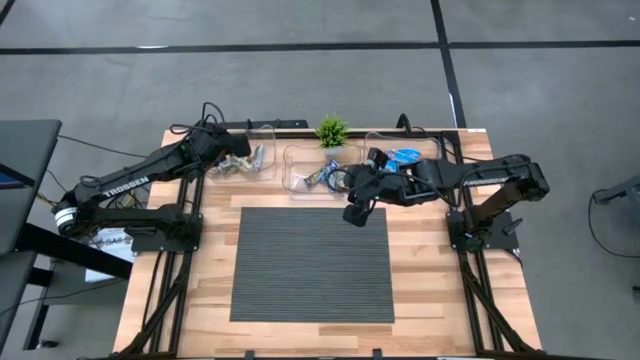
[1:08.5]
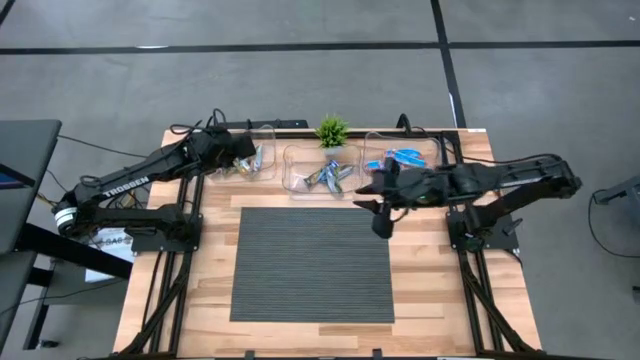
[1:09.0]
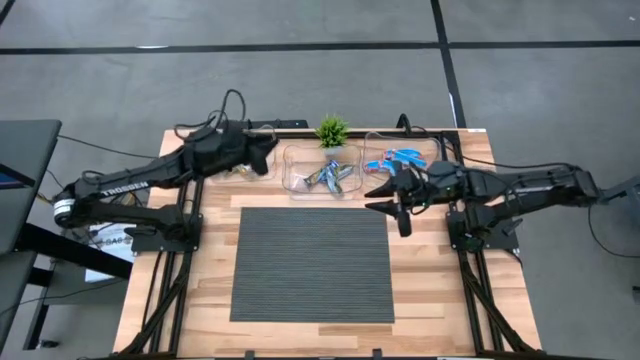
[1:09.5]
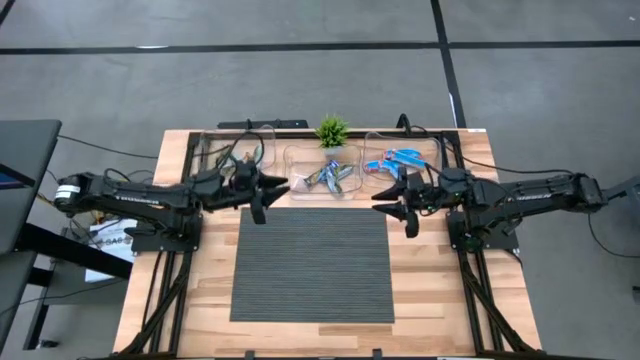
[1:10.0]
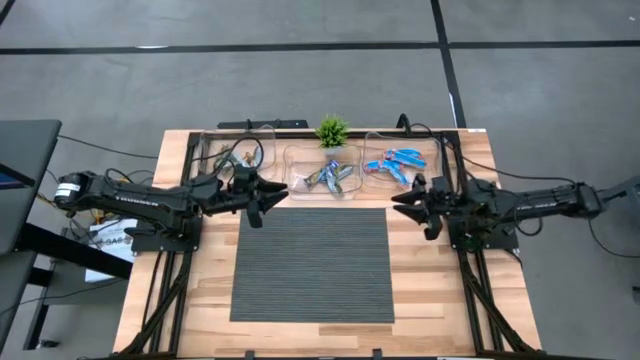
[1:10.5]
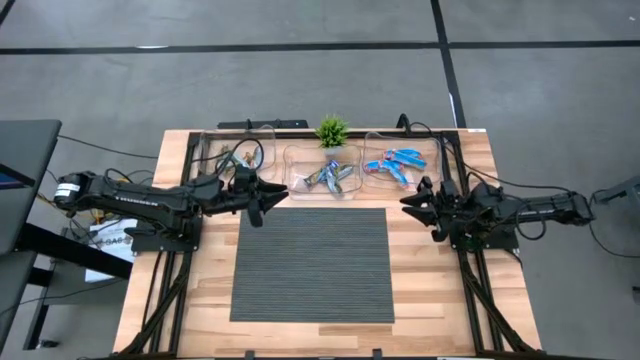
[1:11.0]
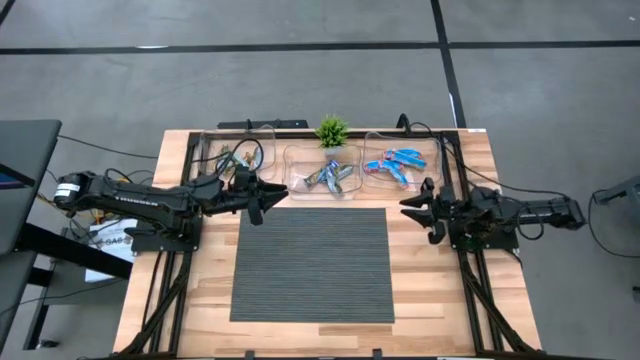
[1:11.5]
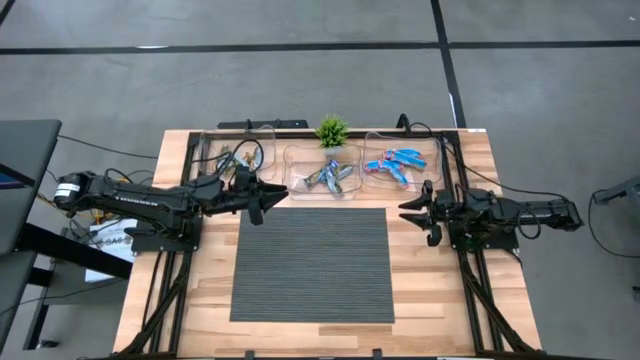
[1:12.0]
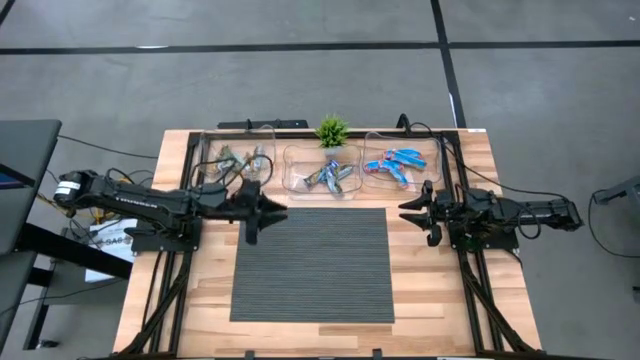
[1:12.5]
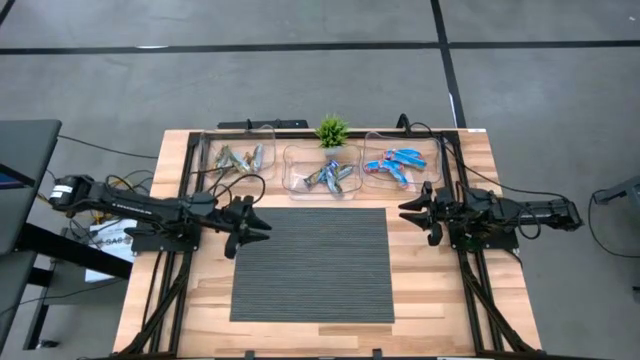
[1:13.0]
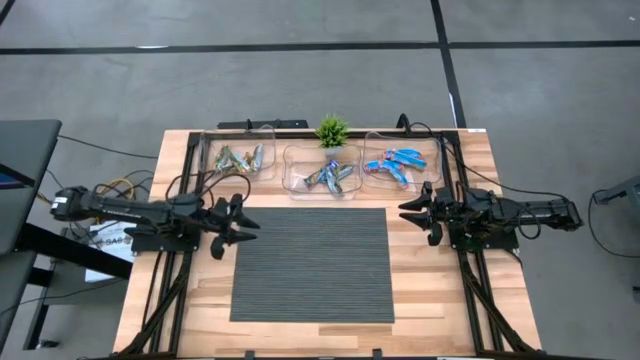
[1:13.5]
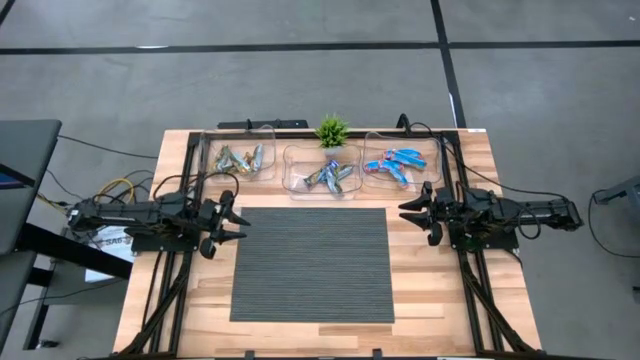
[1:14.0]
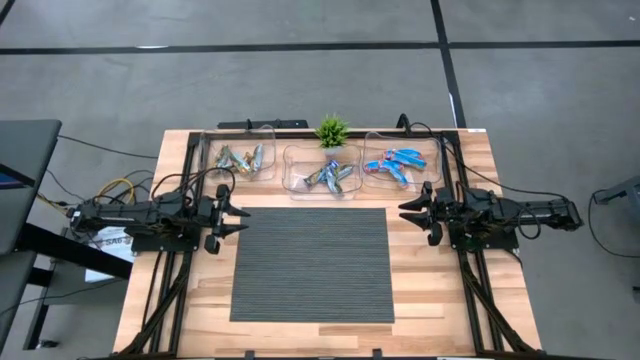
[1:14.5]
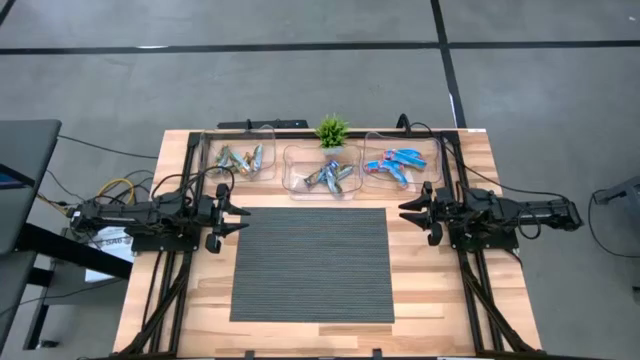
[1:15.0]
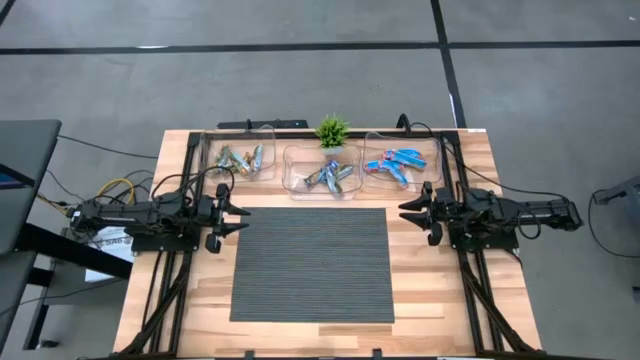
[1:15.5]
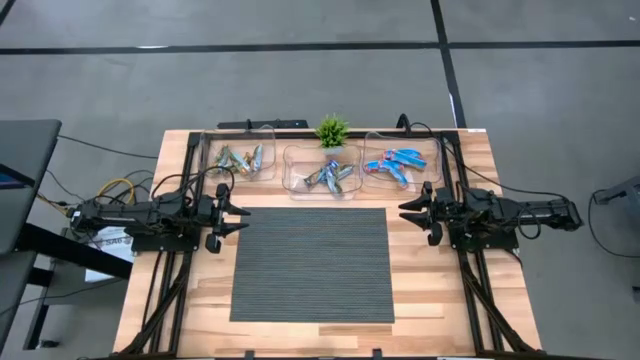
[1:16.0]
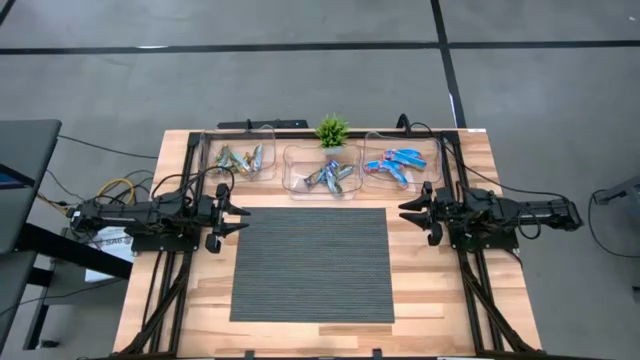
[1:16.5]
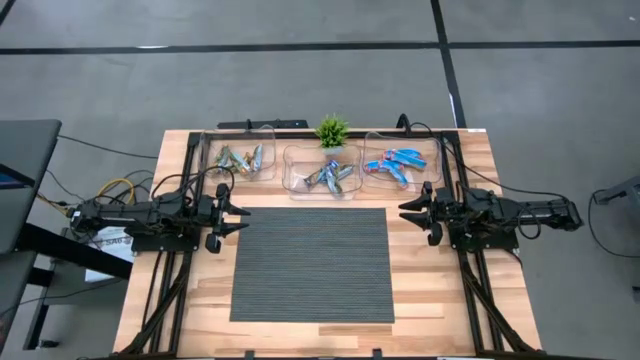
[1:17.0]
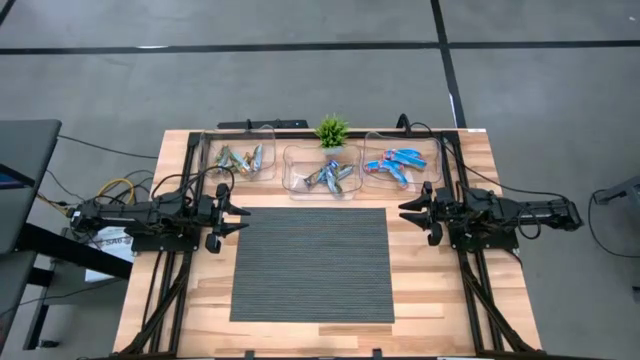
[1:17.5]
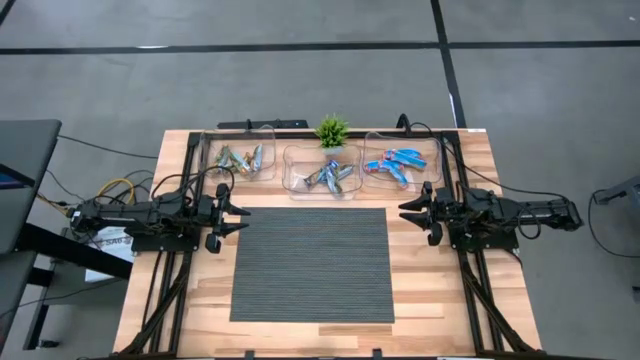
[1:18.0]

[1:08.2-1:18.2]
Task: Pick and place Granola Bars by type
Return to Home Position

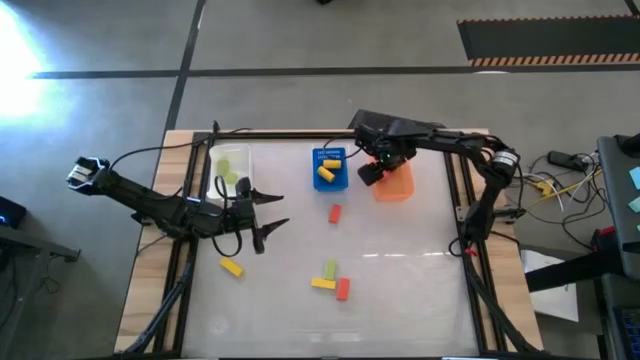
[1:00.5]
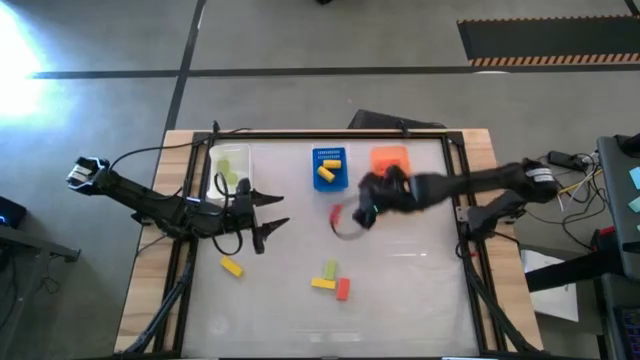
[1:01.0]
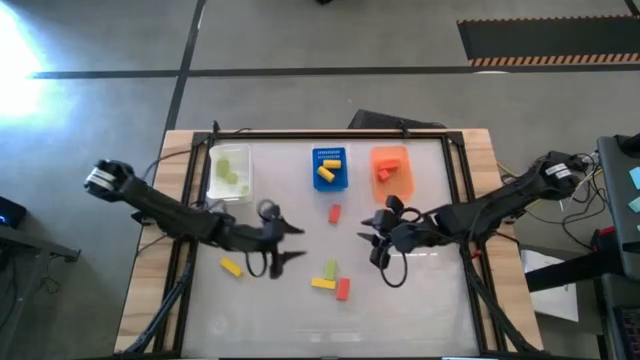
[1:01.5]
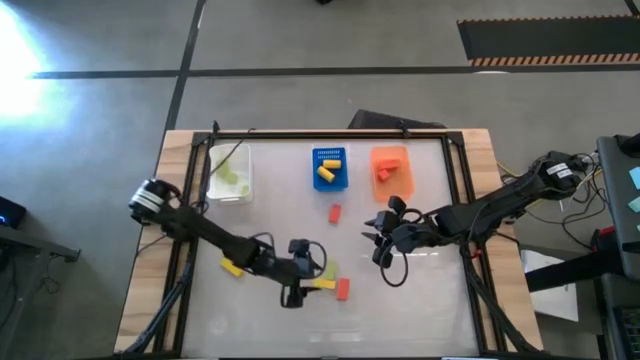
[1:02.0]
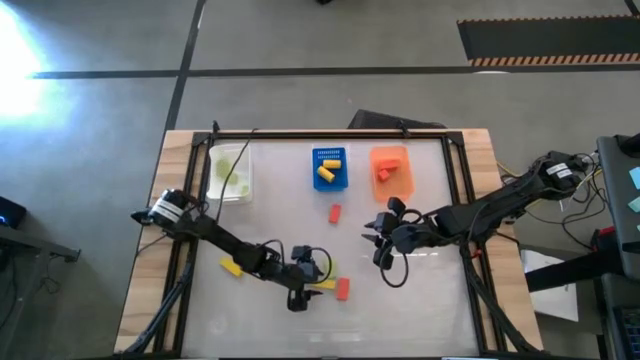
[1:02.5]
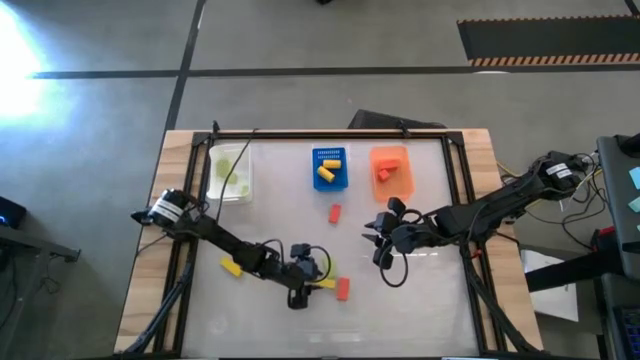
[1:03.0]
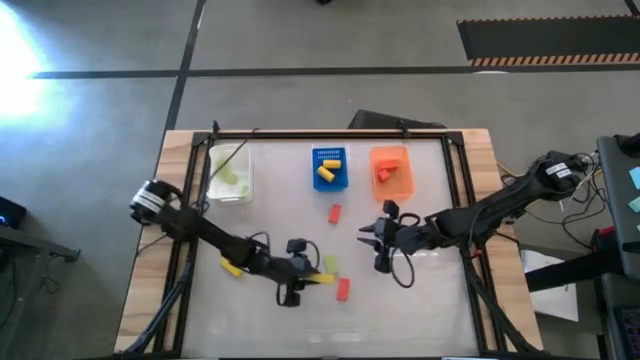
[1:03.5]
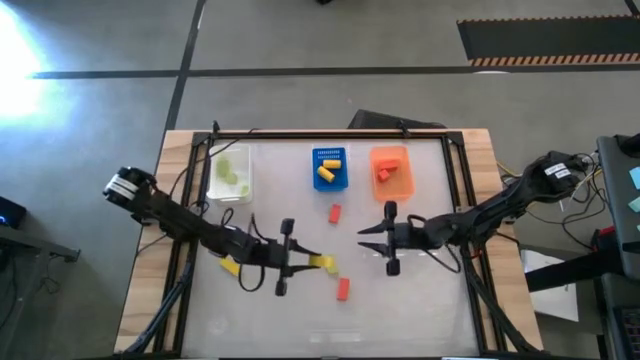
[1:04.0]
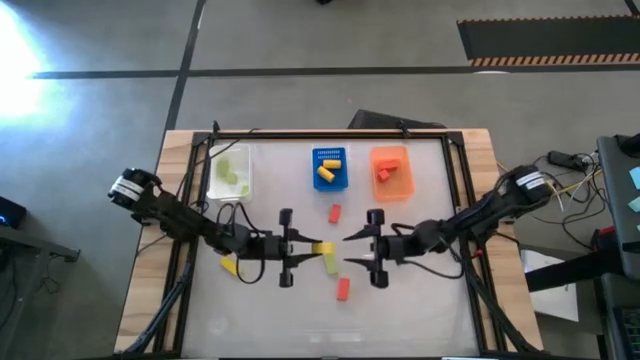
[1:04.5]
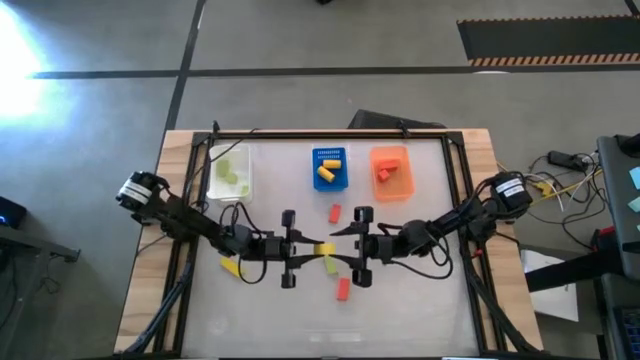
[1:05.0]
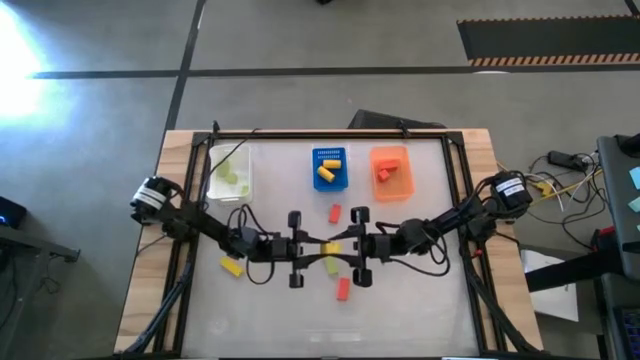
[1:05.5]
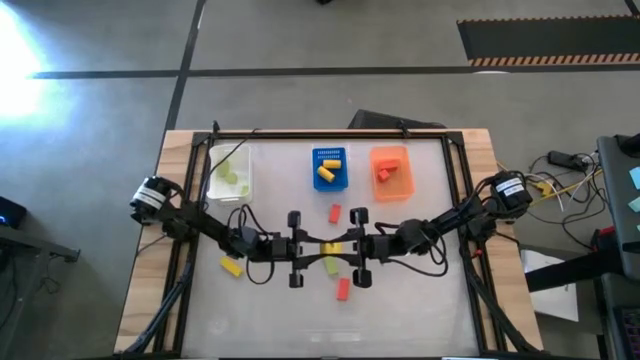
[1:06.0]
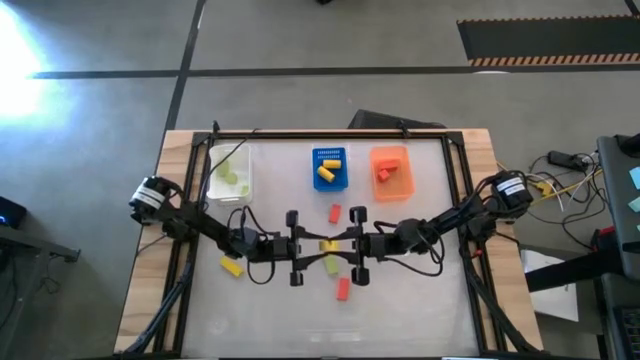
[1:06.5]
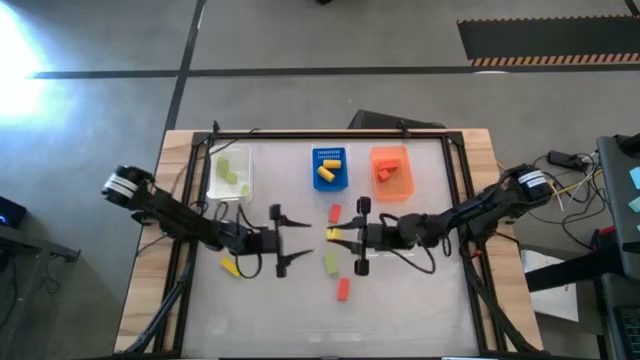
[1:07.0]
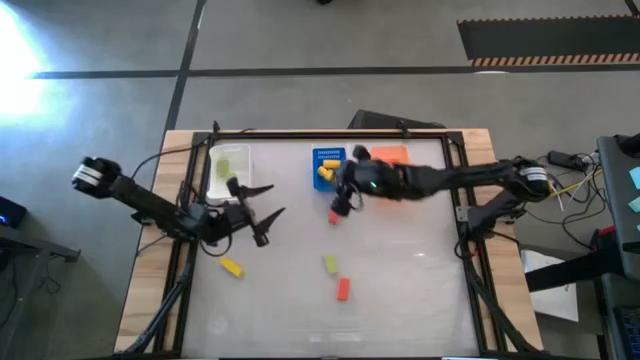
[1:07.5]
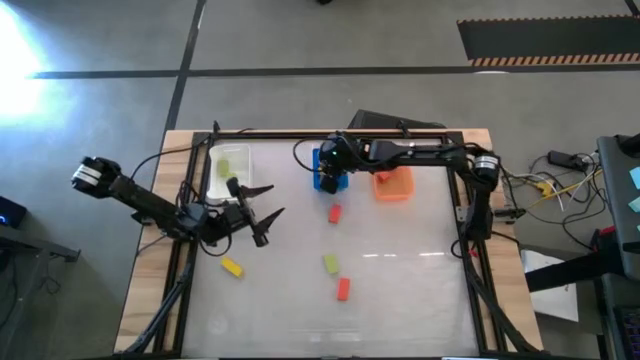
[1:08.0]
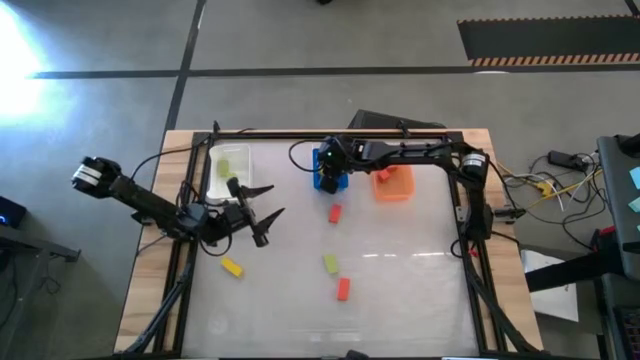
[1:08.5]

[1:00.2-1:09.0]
Task: Sort & place blocks by color
Put the yellow block into the blue bin
